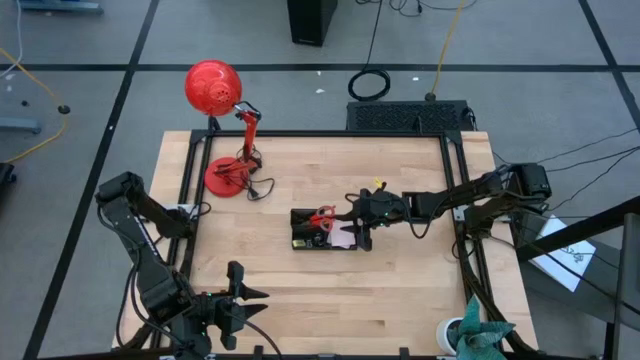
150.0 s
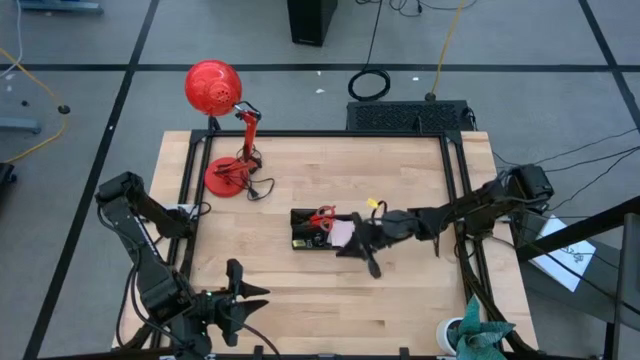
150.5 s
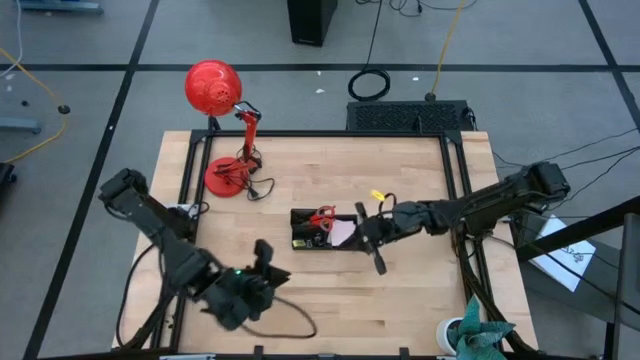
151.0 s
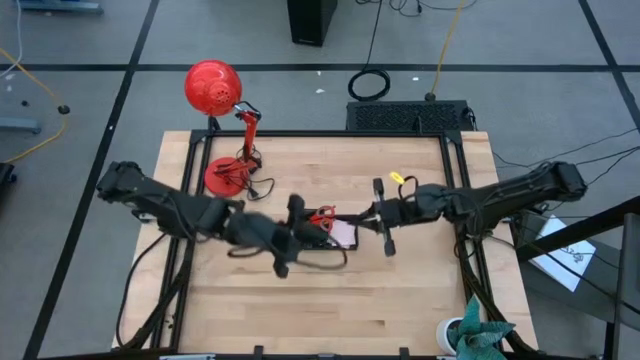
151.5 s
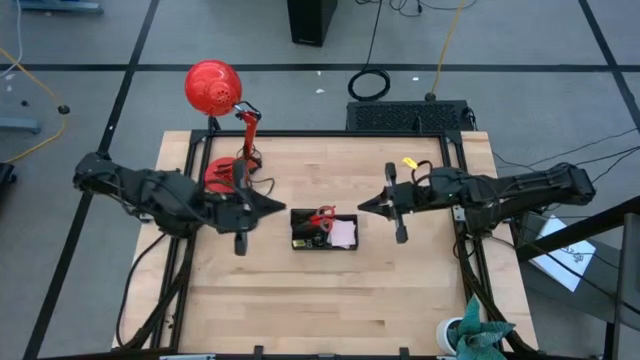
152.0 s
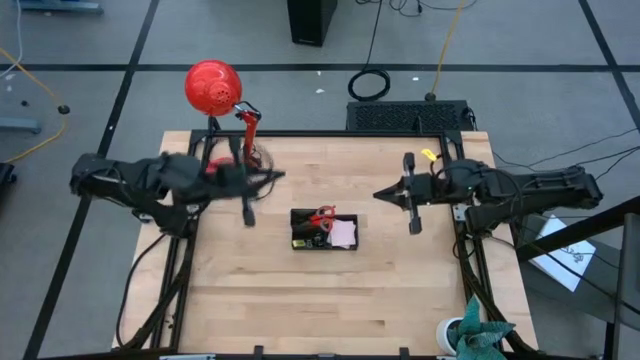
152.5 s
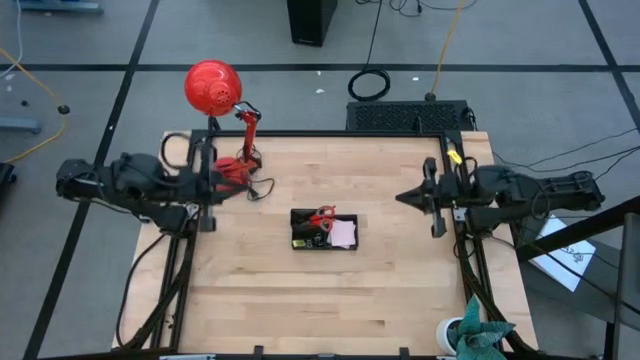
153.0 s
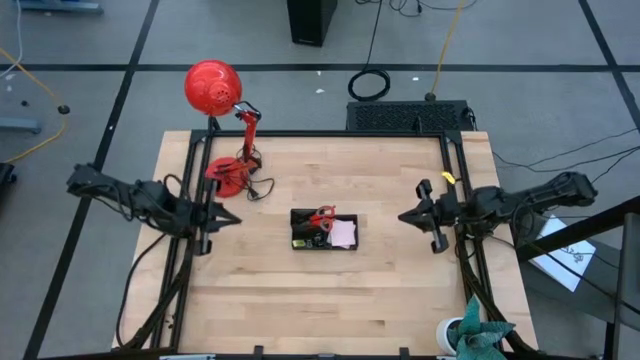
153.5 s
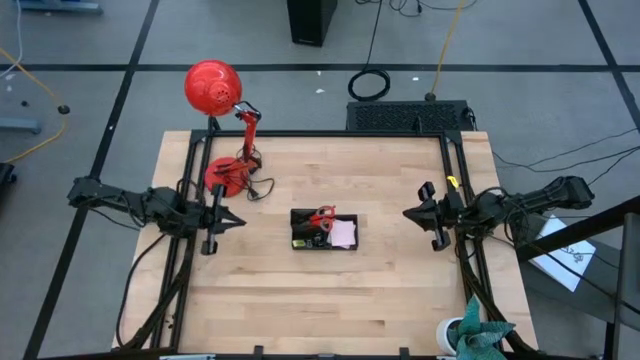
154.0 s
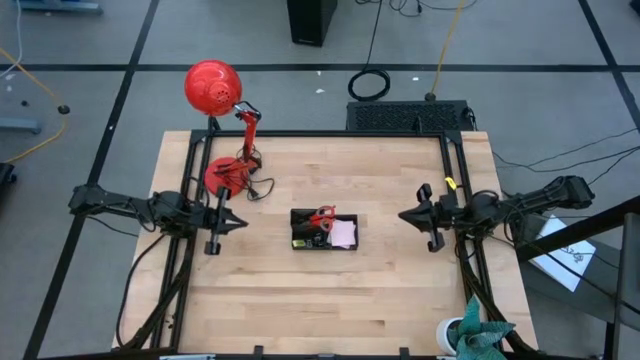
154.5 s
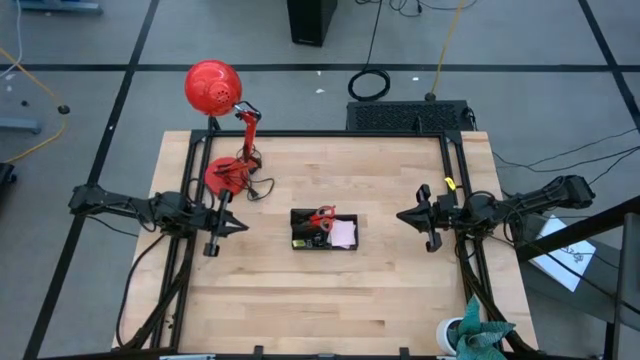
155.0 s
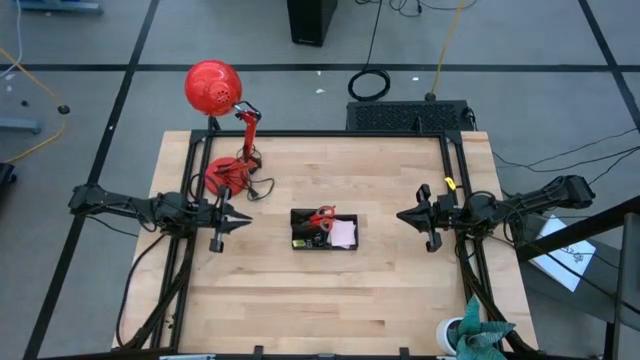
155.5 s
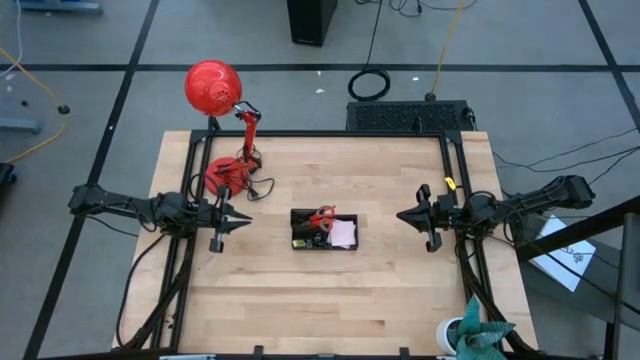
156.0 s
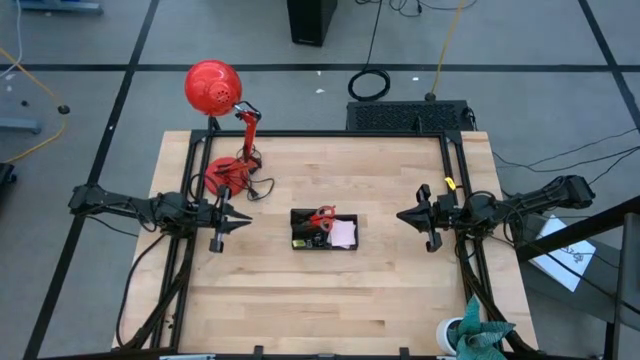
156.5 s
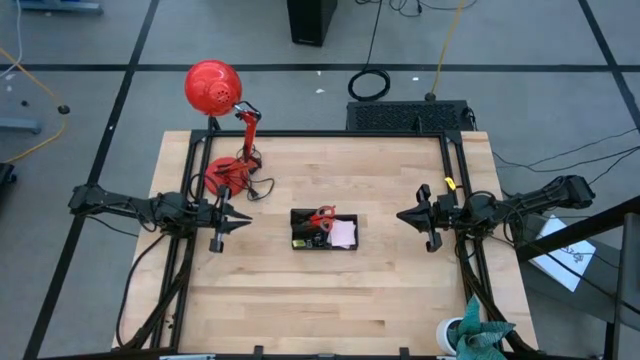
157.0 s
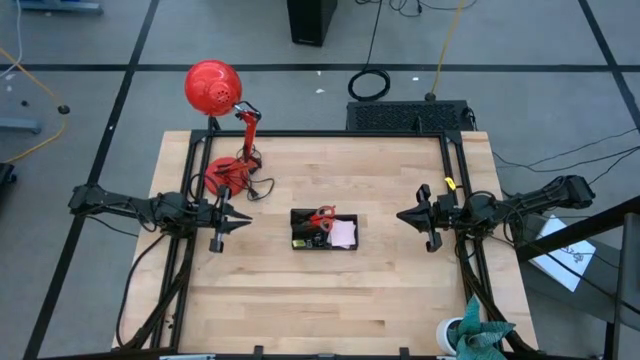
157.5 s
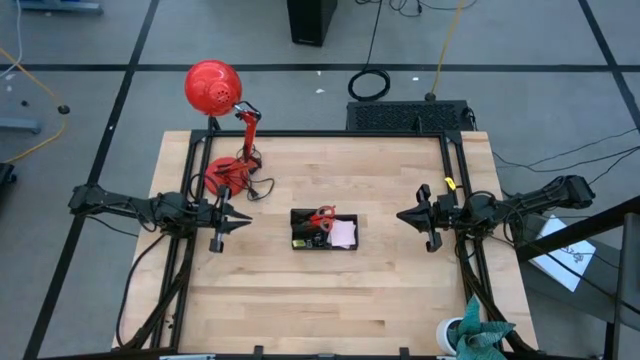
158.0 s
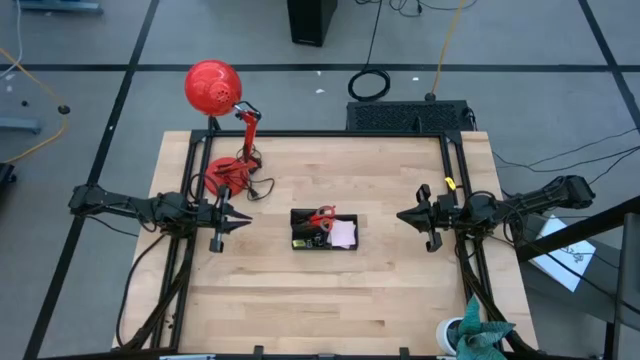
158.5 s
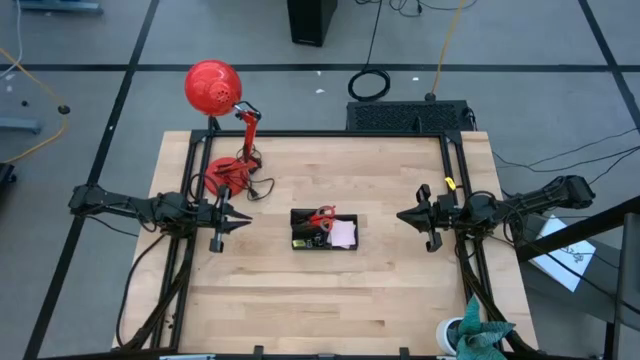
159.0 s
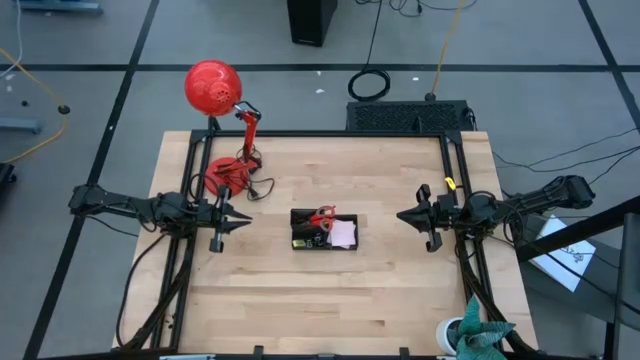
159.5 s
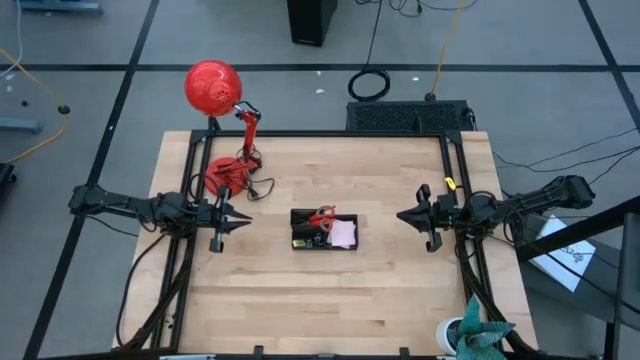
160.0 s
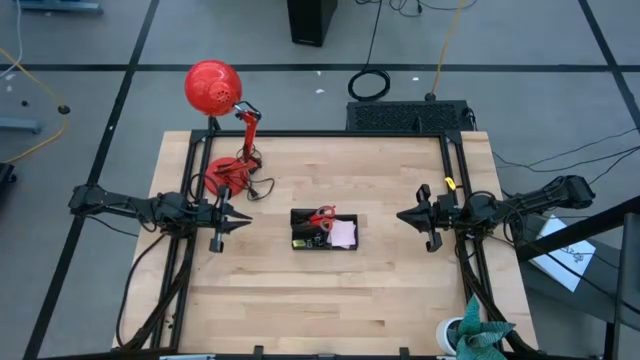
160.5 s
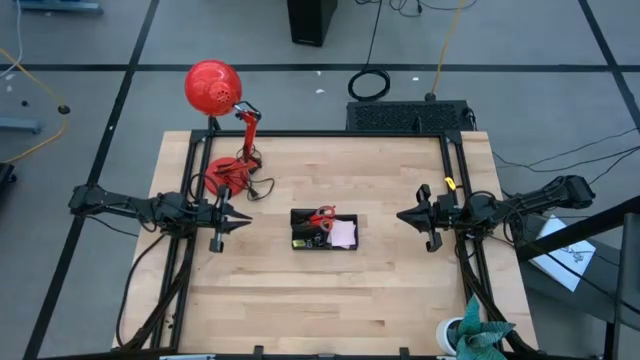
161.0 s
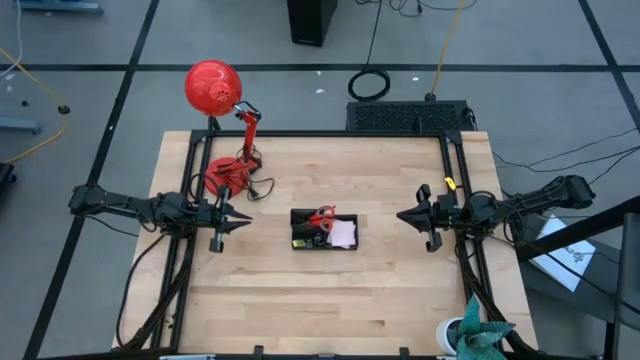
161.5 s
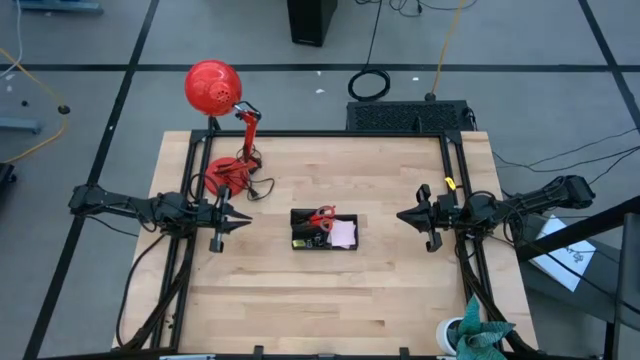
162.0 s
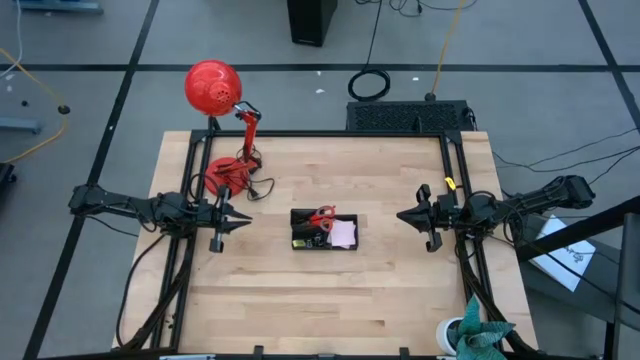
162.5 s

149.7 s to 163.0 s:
Task: Pick and place office supplies into organizer
Return to Home Position

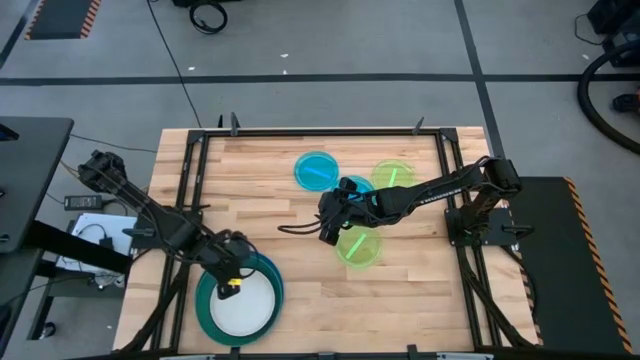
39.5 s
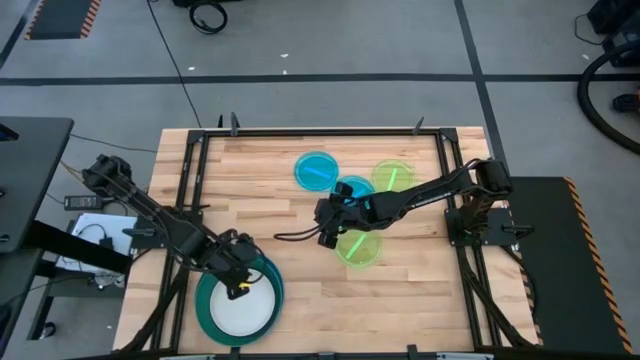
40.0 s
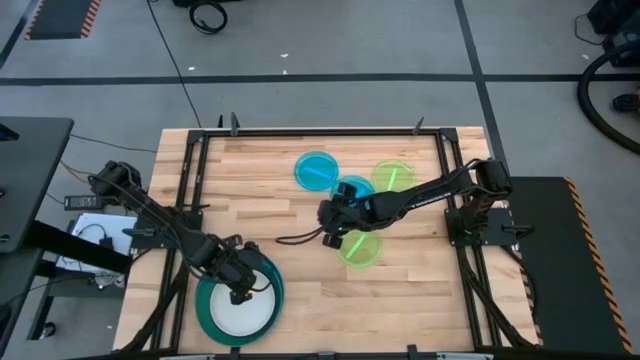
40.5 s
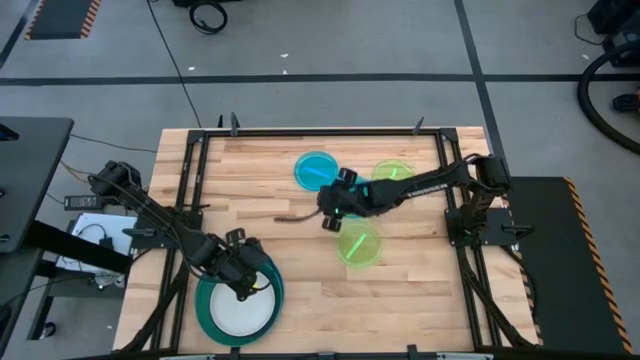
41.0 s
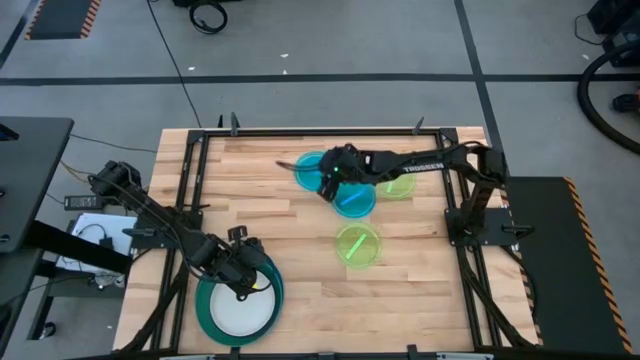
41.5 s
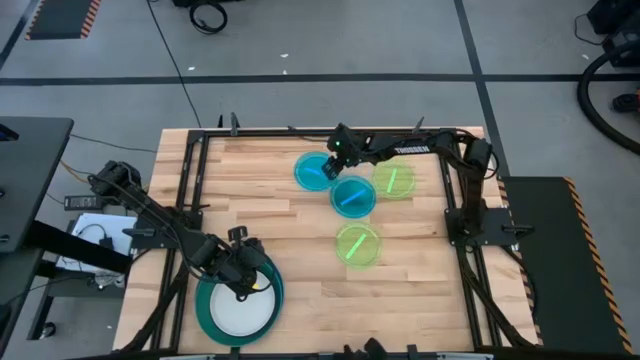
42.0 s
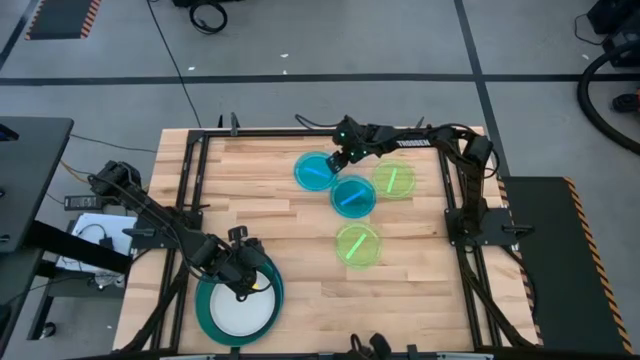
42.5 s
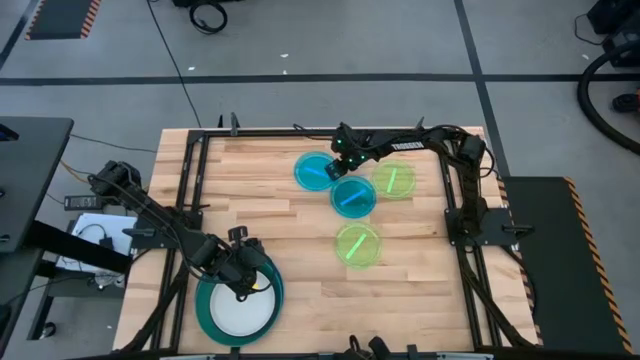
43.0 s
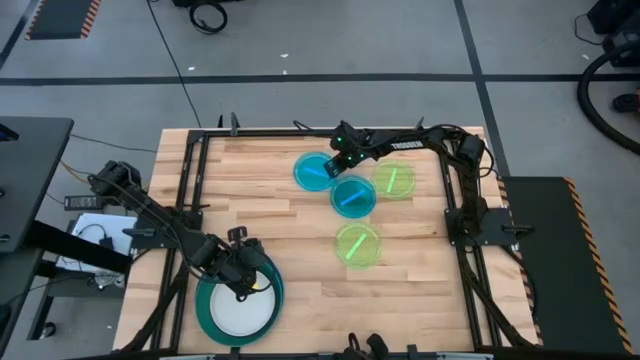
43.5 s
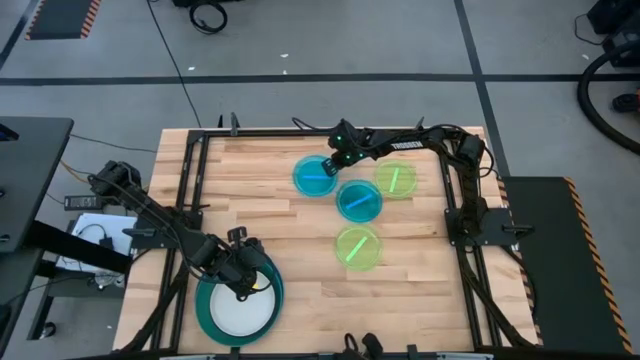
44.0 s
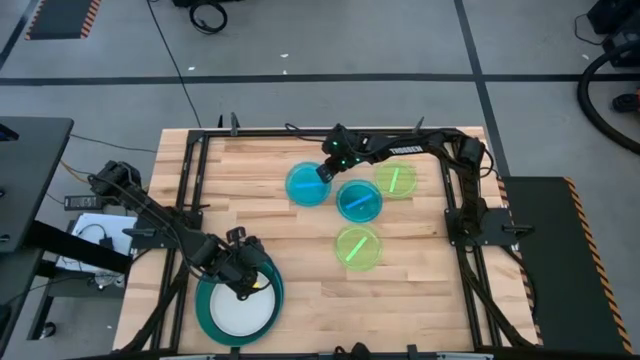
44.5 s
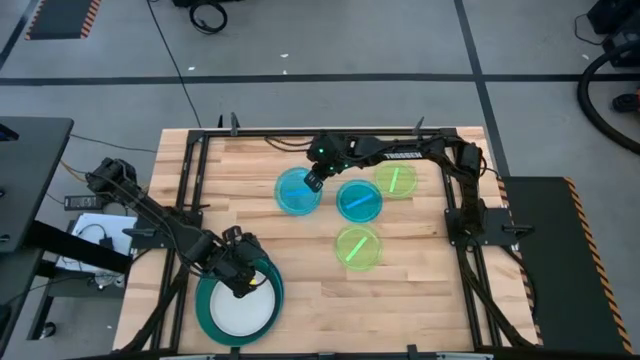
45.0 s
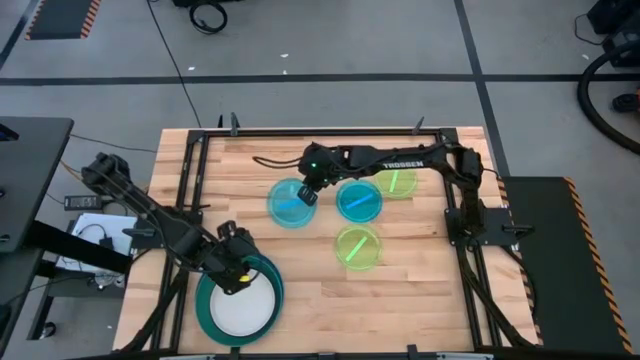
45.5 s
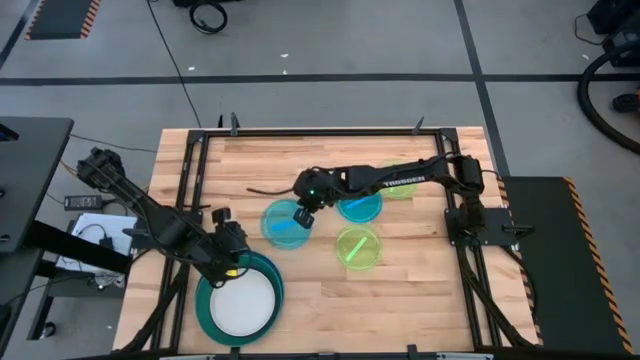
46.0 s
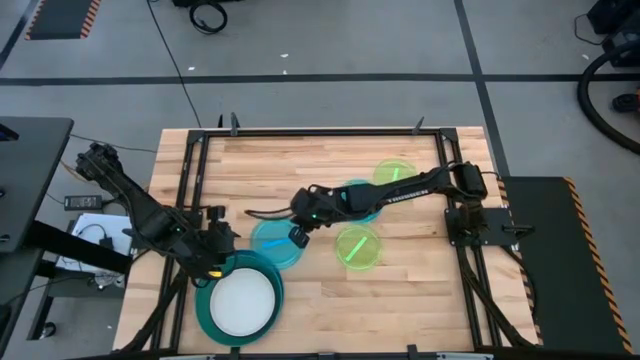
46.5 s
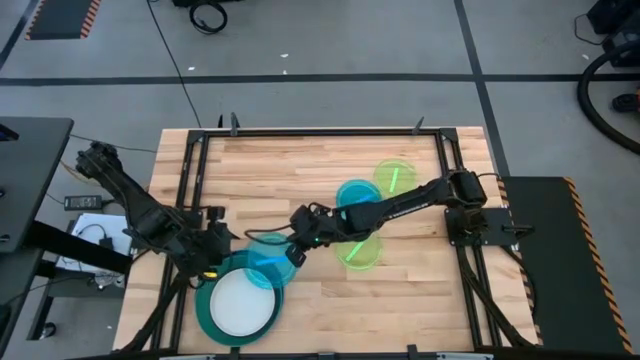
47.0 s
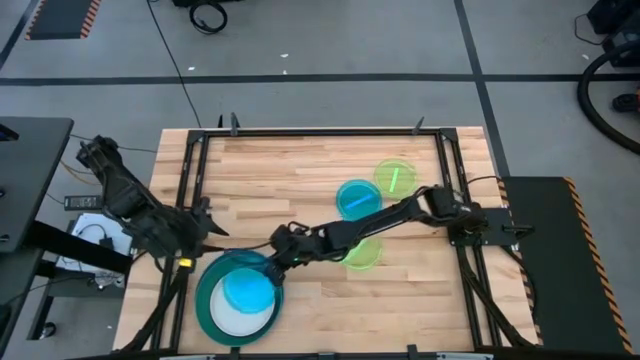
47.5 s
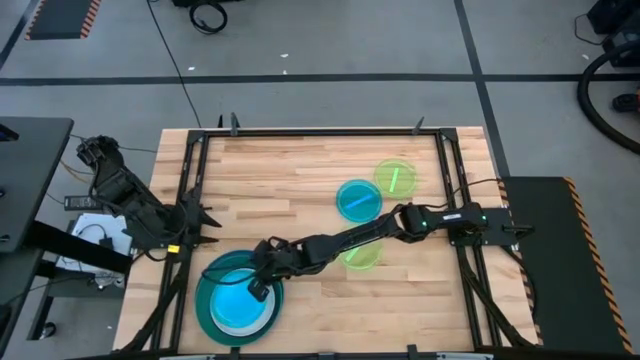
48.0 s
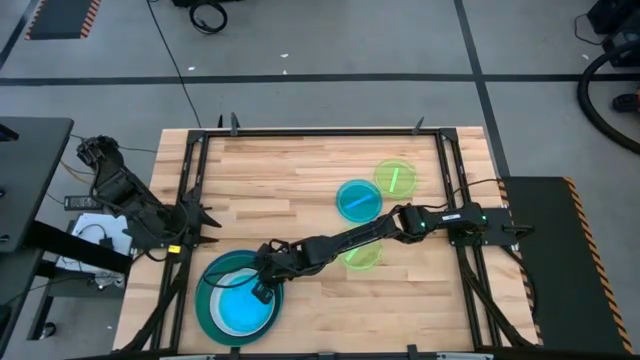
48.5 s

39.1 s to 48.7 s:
Task: Stack plastic plates
Stack the top light blue plate on top of the white plate
